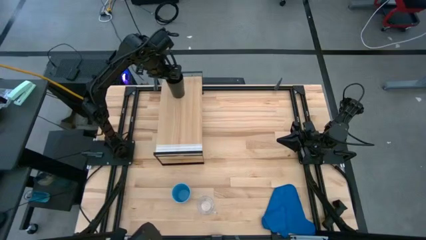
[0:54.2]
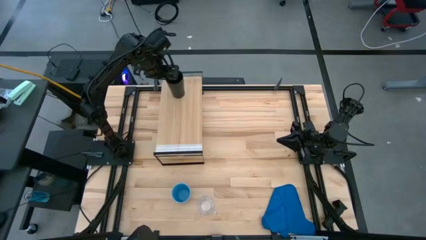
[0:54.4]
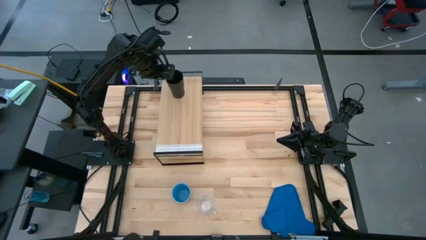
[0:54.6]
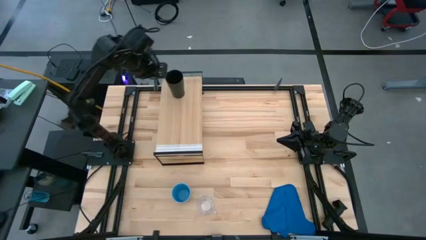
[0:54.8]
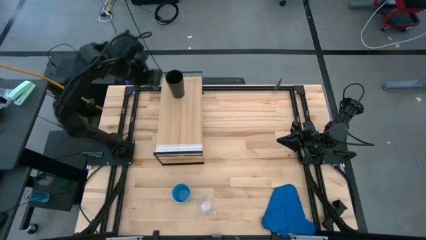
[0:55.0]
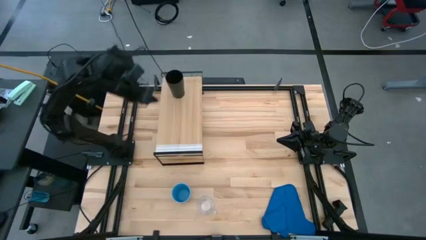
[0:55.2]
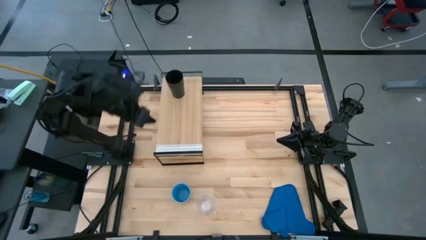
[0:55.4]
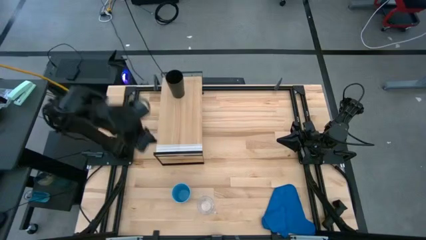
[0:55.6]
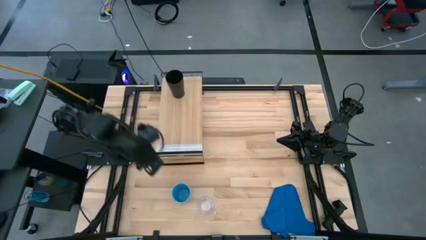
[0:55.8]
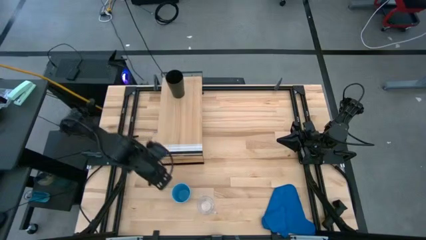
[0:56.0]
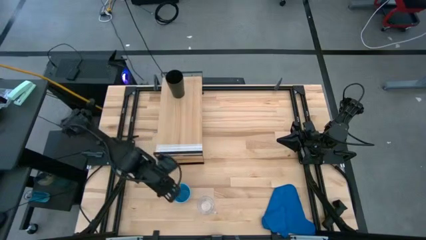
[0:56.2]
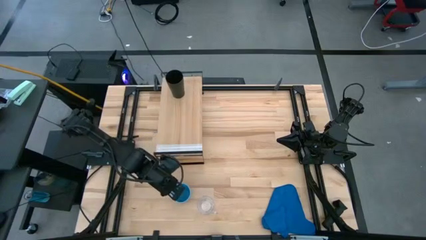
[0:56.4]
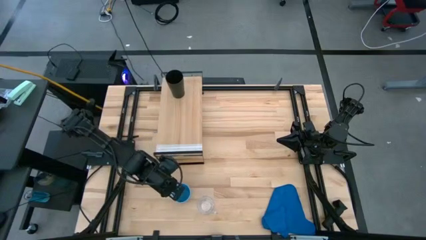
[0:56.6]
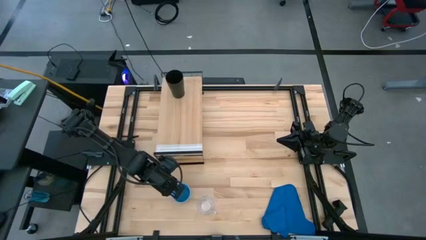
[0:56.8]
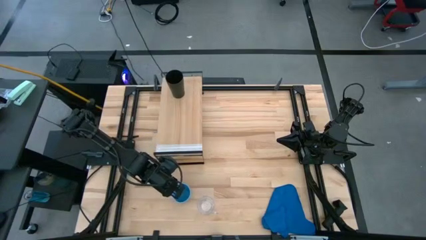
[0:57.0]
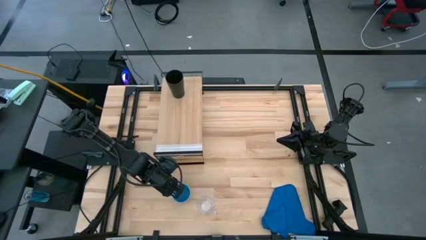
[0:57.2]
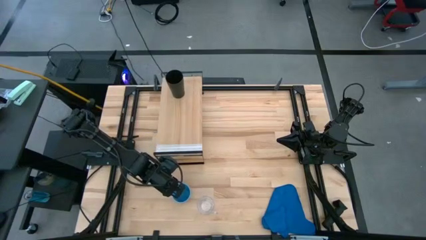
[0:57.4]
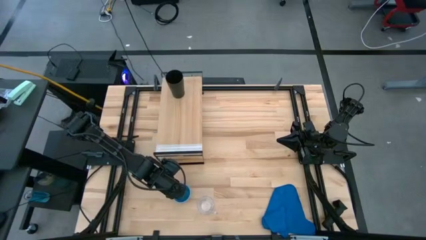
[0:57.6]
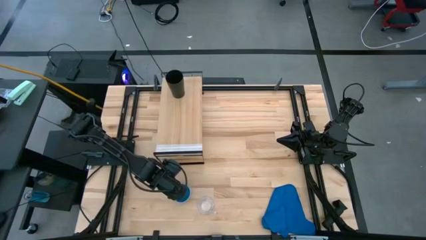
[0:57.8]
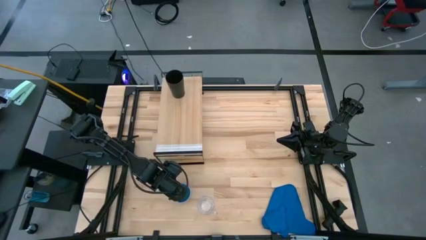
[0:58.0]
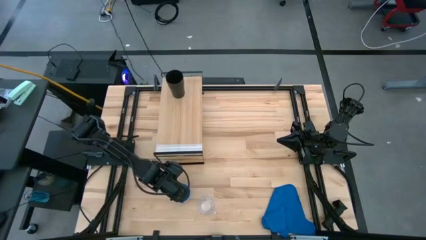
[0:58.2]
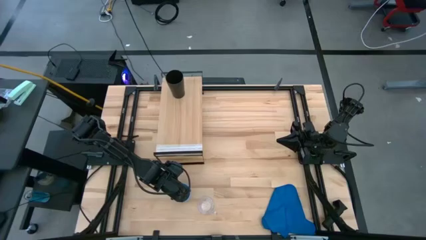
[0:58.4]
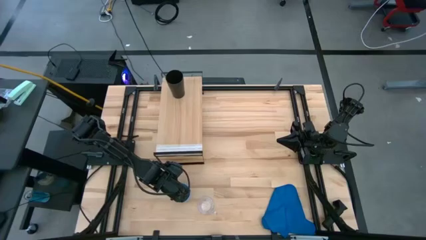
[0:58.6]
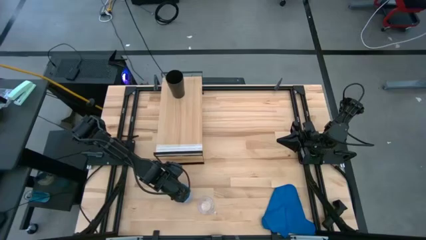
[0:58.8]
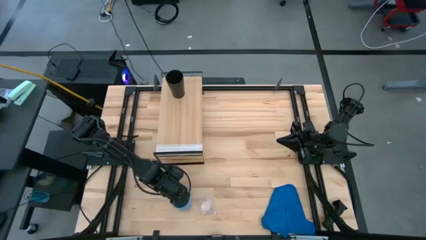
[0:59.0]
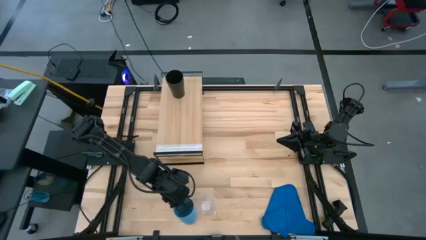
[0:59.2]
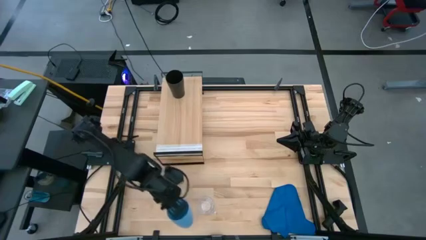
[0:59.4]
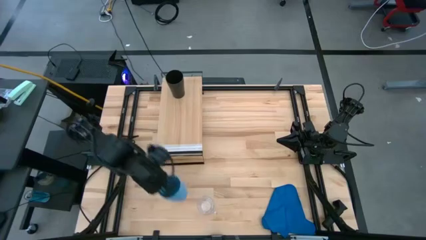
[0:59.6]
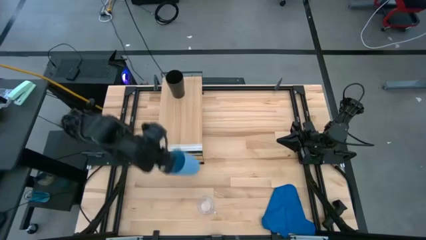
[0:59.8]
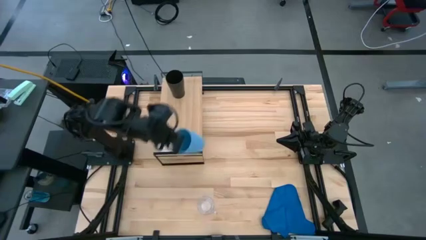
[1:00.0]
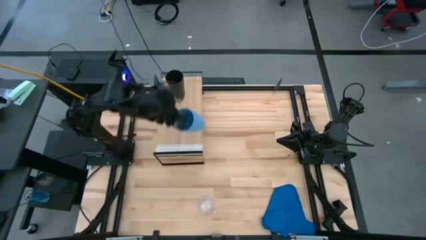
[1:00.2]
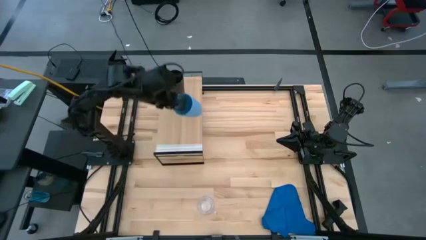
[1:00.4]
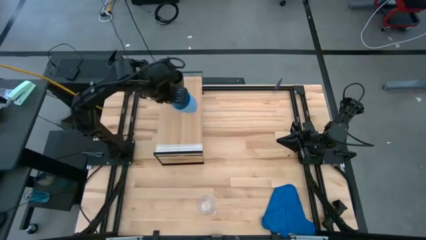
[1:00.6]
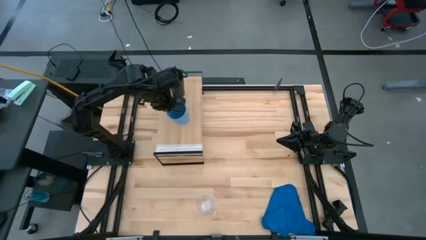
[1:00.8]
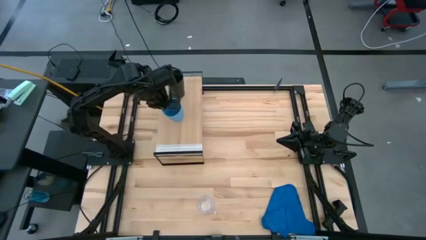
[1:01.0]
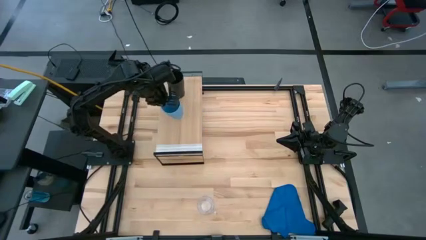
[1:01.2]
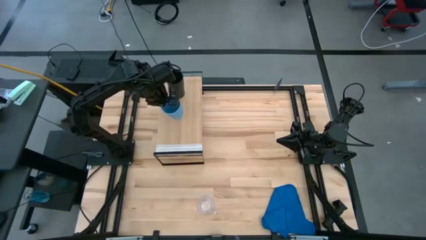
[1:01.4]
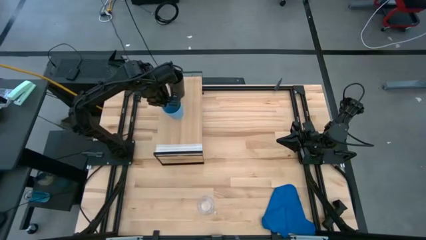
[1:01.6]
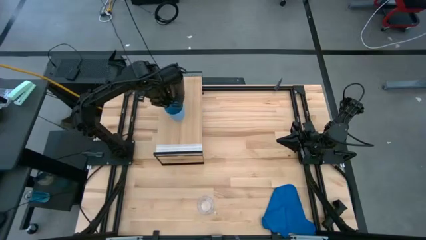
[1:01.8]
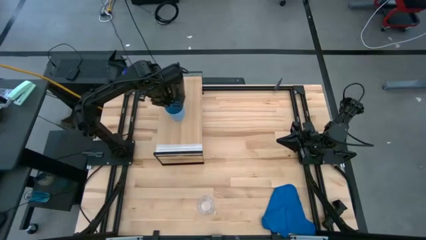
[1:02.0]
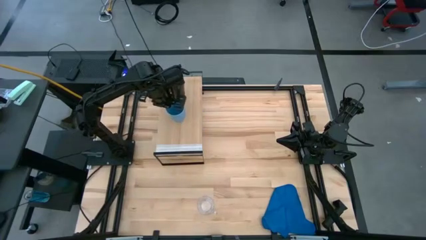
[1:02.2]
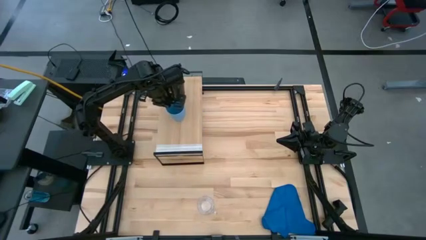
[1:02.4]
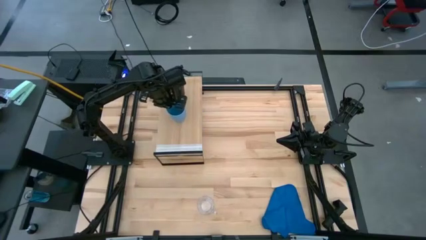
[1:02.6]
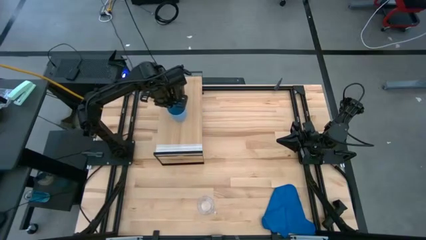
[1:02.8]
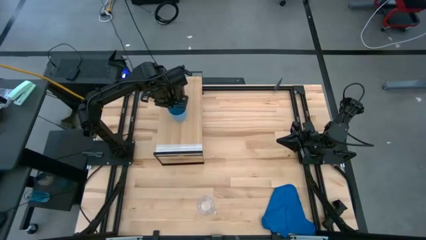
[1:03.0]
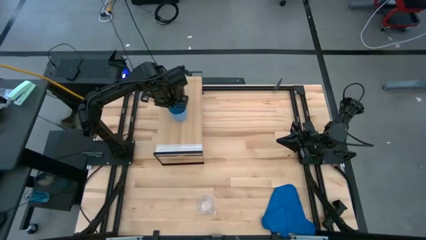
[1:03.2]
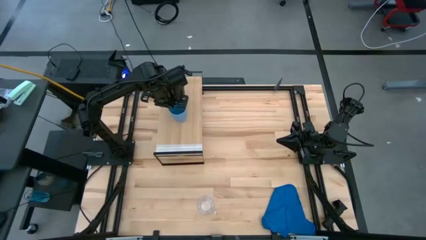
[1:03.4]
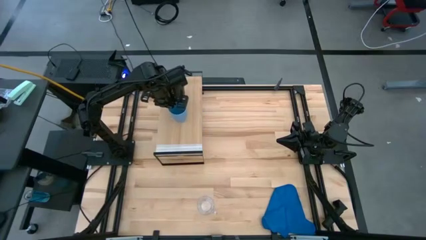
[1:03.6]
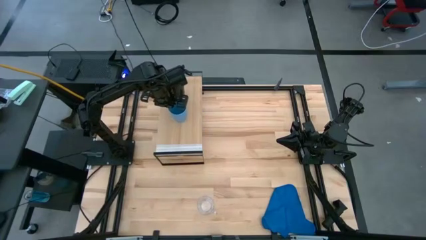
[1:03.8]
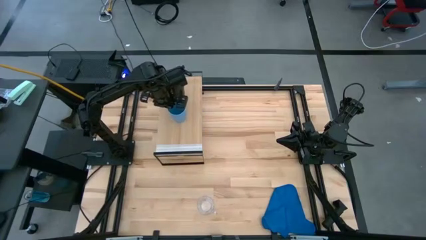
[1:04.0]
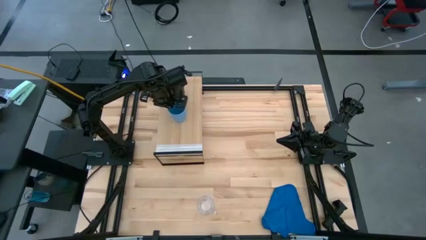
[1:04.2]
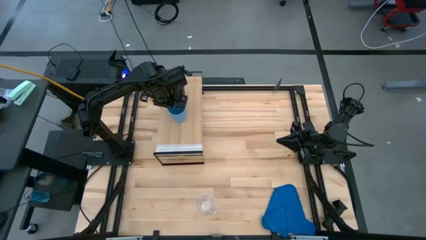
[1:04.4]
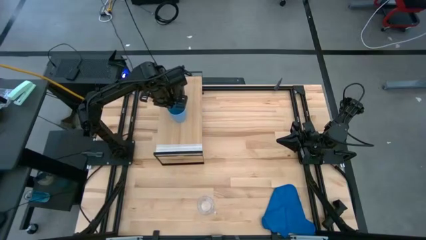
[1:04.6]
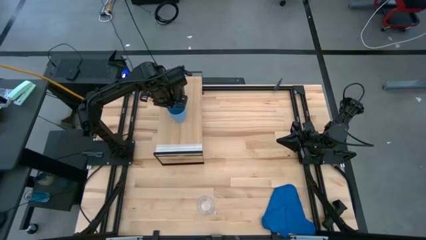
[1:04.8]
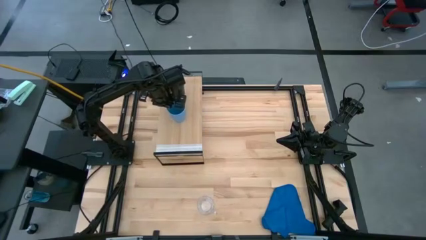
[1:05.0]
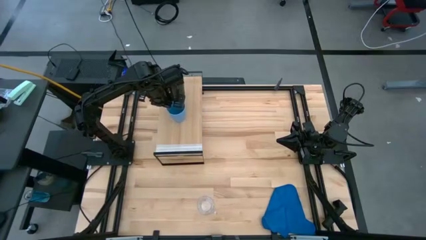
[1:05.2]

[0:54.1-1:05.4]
Task: Stack small to large cups/mugs on shelf
Put the blue cup on the shelf
